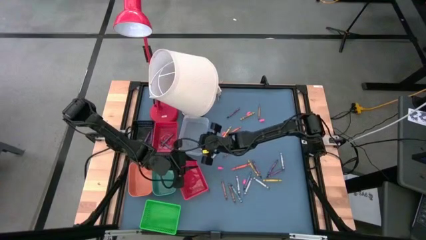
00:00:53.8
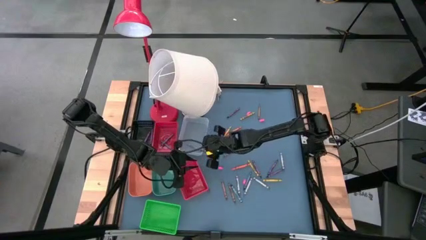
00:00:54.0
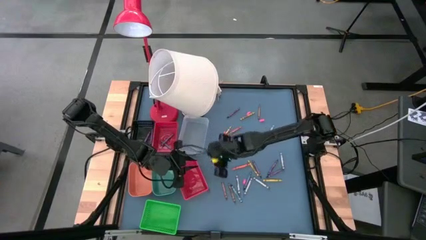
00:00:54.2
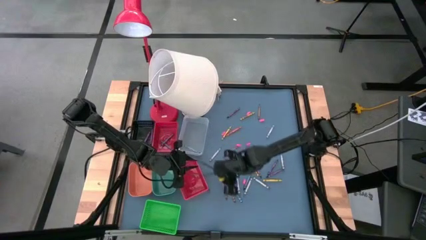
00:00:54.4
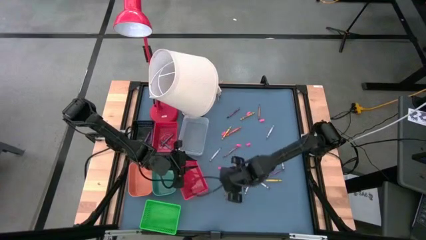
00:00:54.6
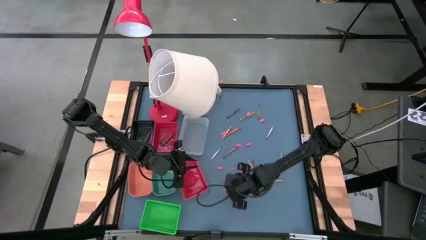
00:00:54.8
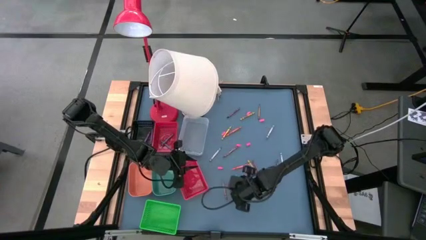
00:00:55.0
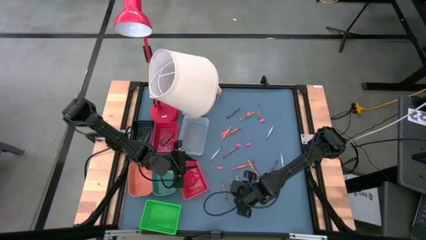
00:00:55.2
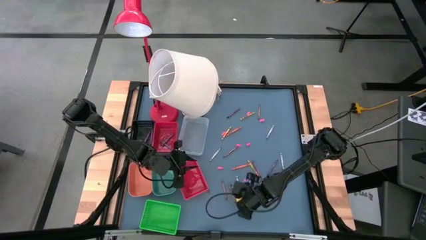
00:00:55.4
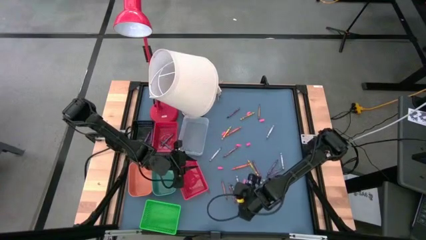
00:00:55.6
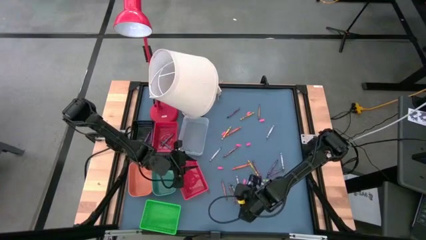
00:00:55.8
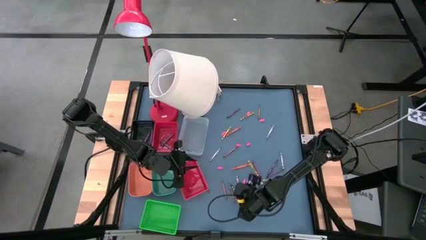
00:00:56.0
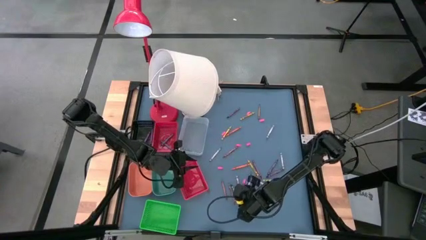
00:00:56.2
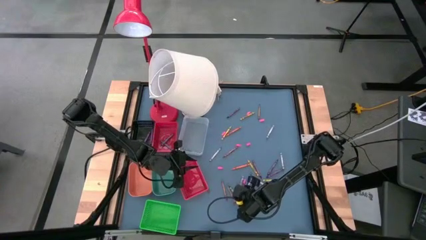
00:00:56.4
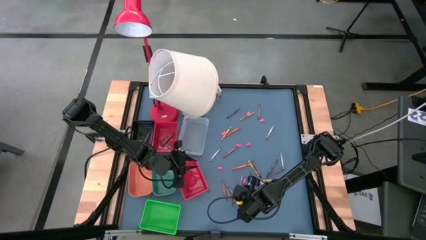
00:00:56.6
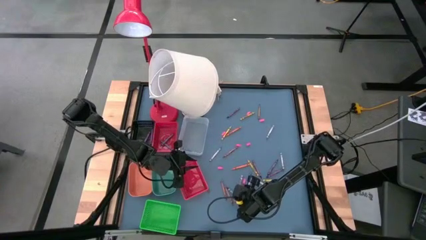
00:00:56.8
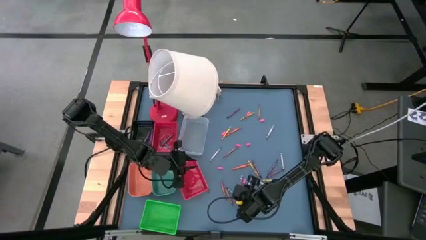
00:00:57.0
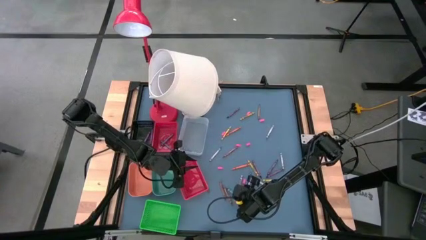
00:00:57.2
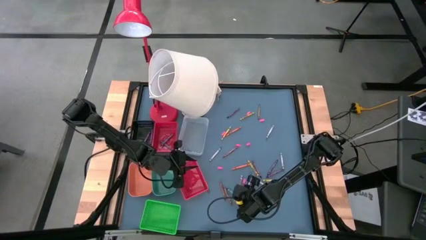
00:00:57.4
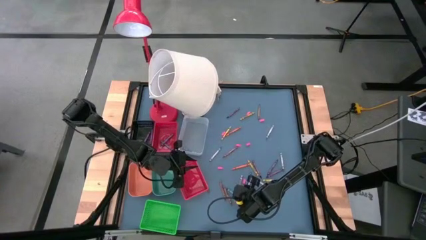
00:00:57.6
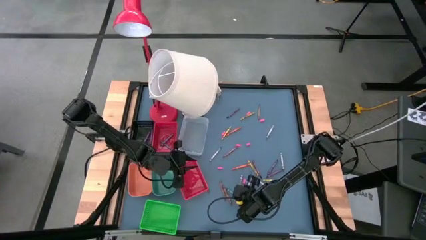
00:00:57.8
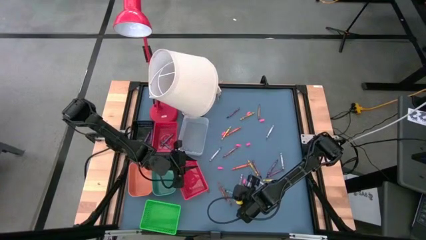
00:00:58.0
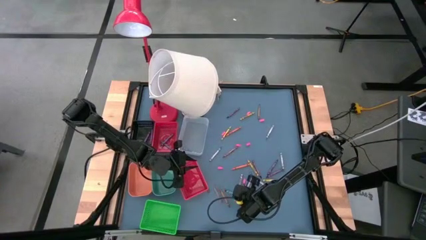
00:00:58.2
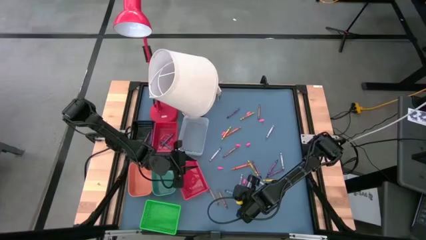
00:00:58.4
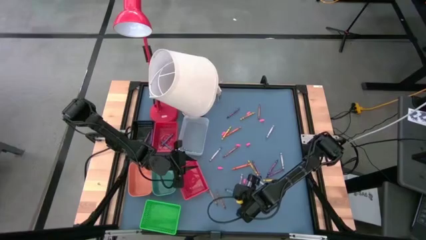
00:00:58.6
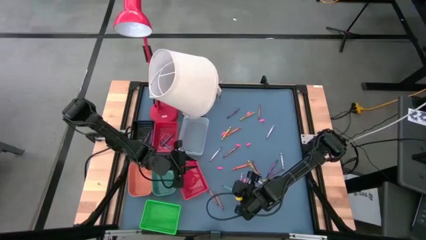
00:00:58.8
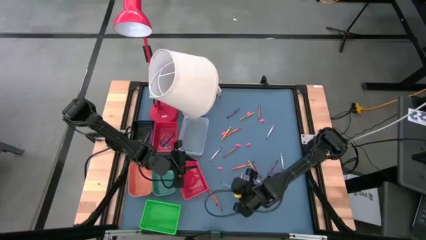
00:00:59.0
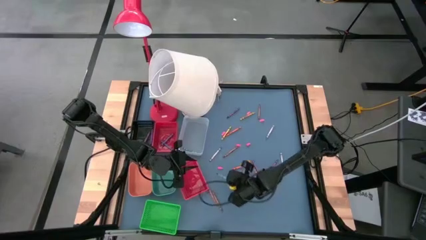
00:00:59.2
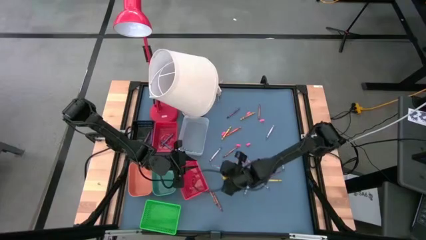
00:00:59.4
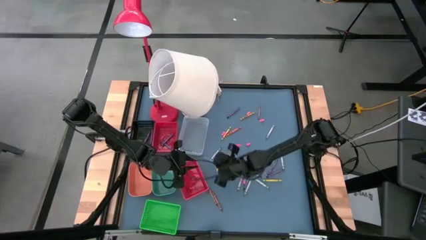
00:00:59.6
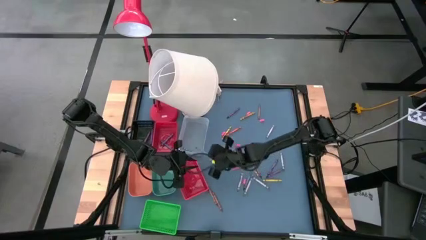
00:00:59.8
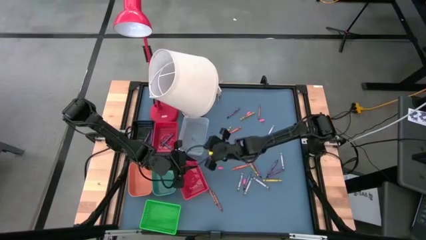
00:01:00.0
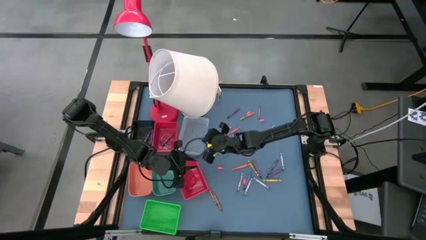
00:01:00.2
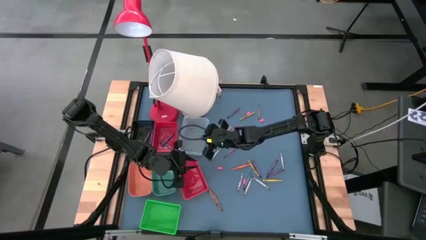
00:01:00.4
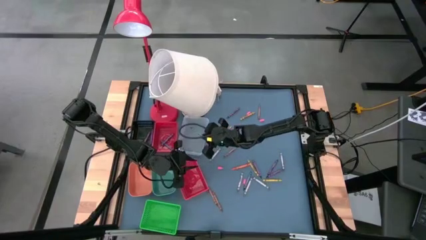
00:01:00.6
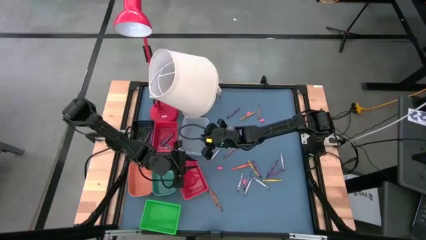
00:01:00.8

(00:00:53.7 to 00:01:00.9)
Task: Sort crayons
Put the light blue crayon into the transparent bin

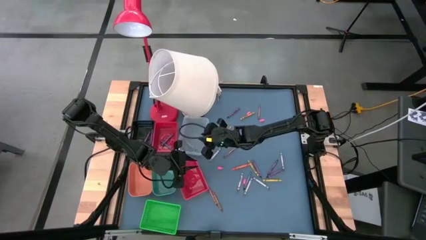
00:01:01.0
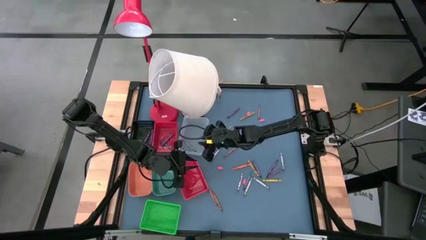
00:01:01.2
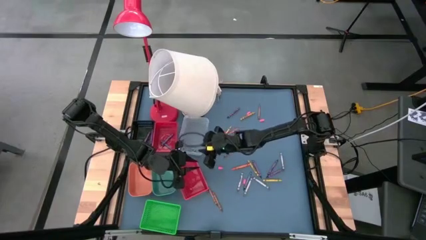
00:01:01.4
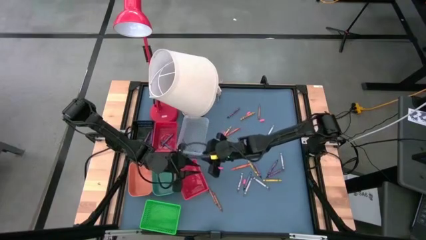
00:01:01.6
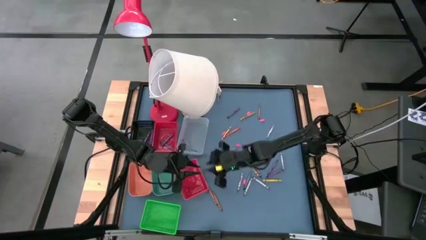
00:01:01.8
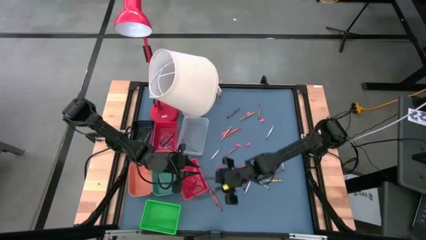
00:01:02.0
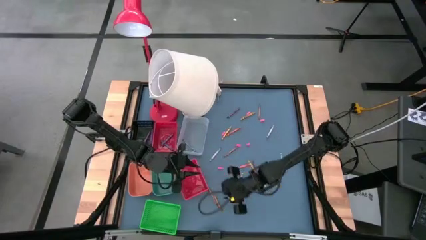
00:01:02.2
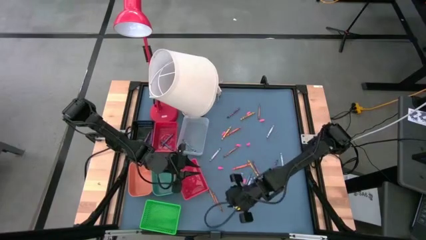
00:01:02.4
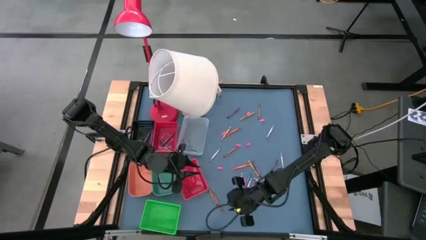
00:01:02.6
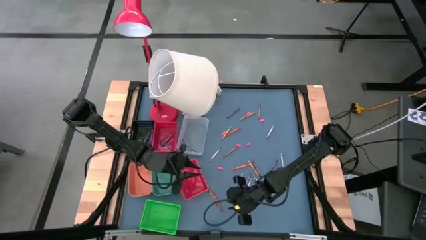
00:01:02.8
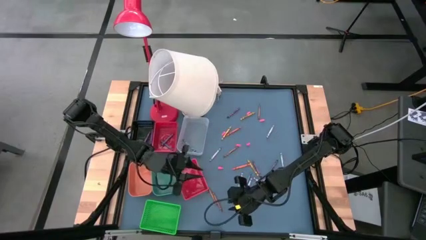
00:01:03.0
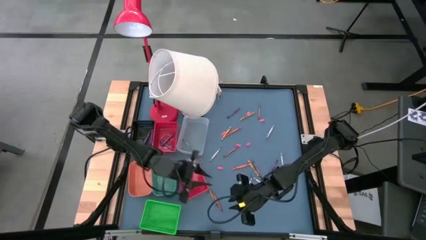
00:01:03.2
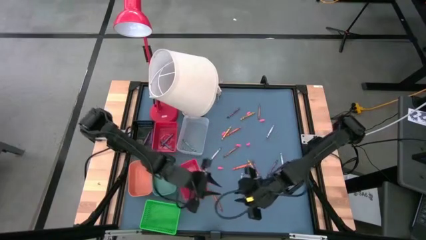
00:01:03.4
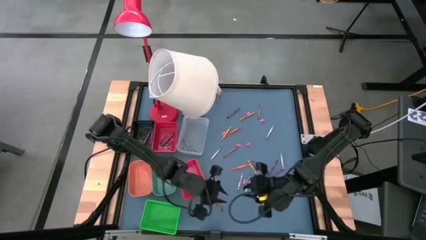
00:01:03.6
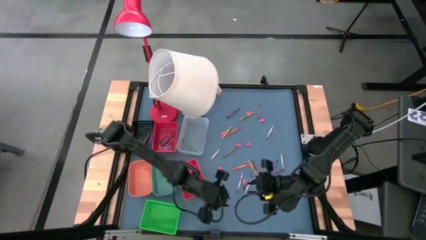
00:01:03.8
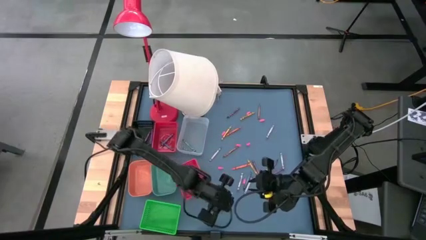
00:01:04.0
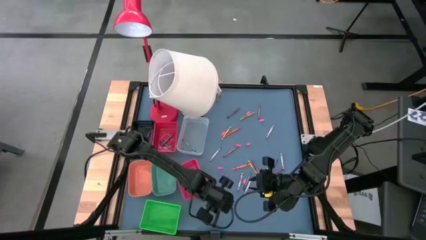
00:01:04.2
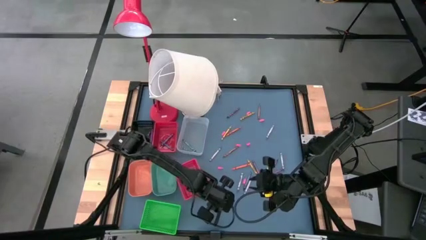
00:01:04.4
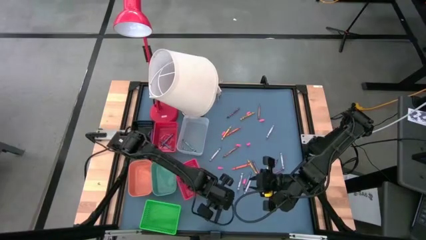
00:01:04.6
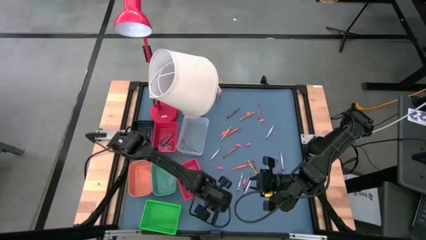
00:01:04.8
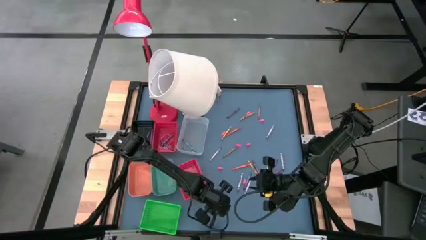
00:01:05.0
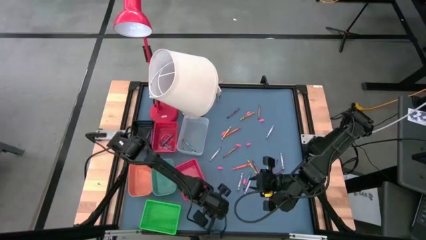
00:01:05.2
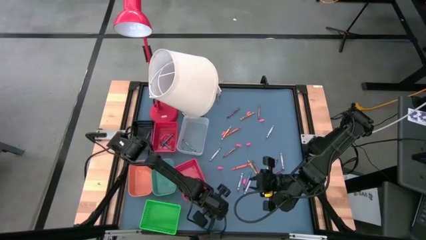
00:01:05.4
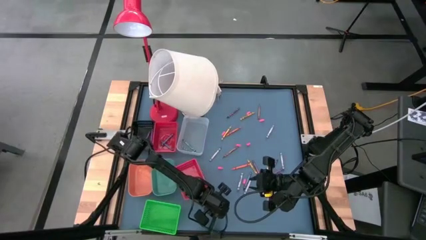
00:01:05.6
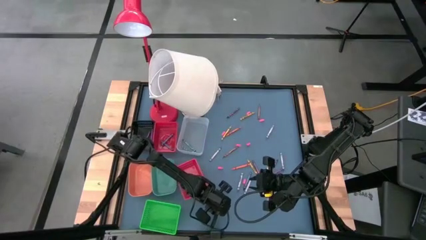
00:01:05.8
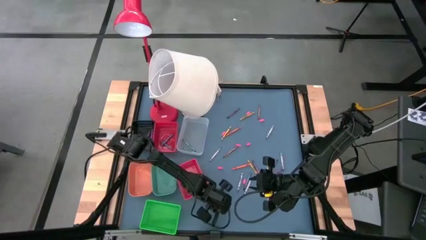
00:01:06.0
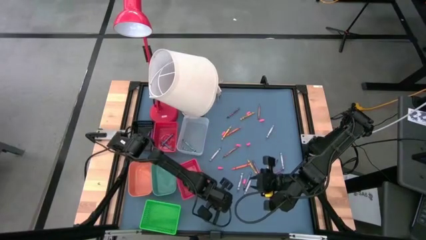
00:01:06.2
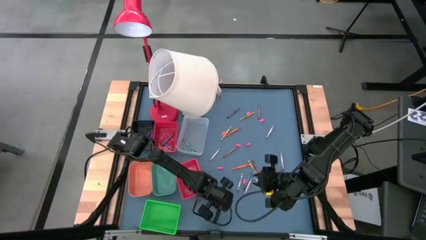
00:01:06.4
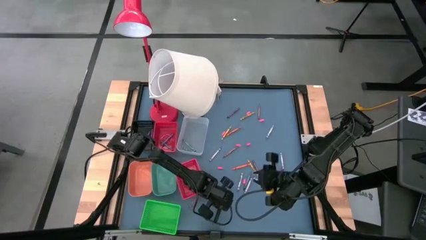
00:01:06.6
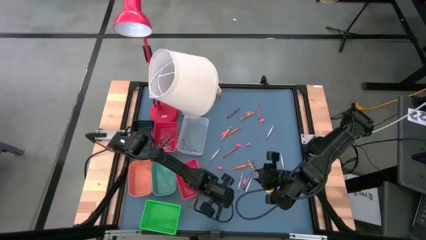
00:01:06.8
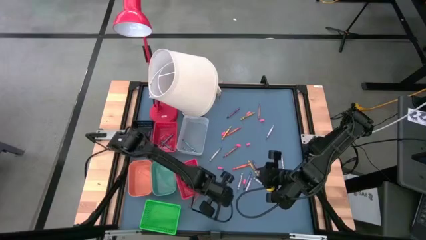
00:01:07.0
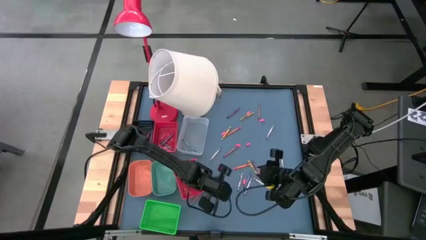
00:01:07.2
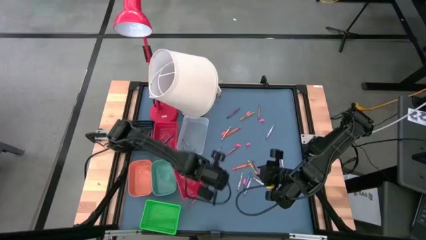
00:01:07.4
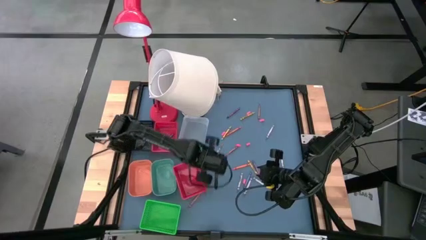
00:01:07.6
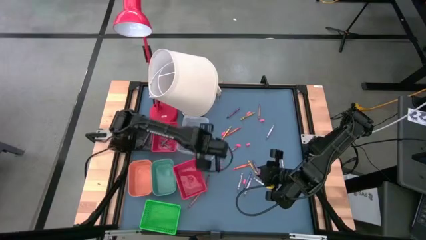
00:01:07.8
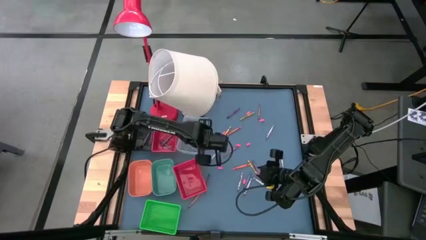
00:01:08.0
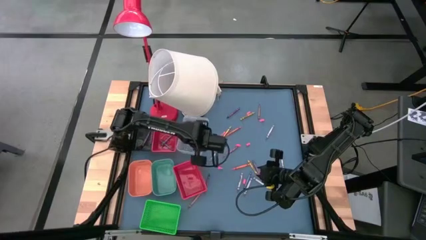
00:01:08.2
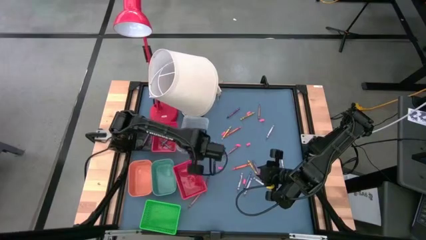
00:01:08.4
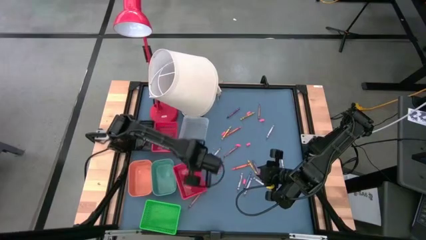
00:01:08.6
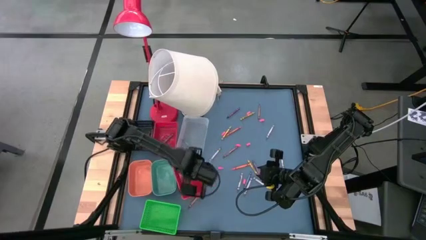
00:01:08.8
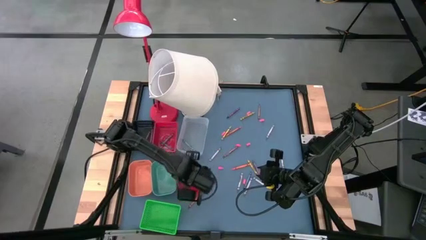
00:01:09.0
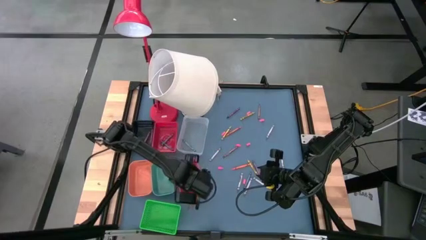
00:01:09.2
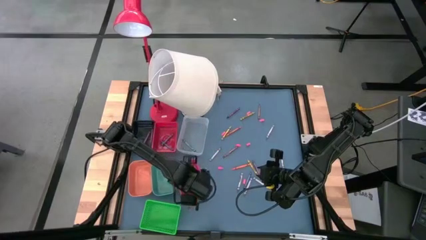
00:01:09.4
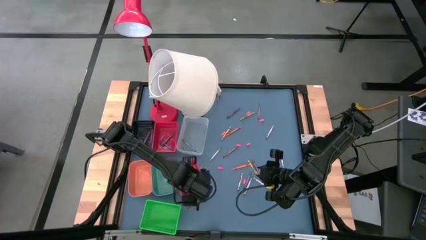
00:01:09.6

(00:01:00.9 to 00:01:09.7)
Put the brown crayon into the bottom red bin
